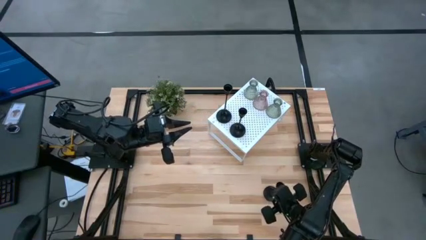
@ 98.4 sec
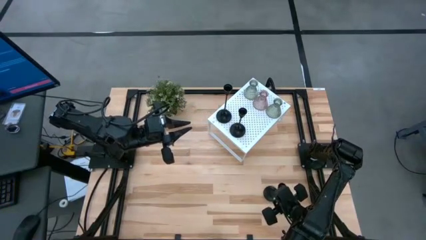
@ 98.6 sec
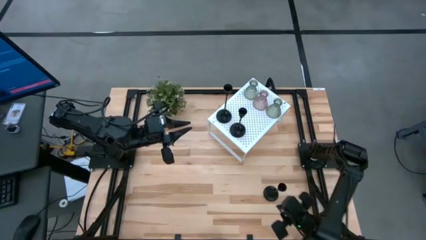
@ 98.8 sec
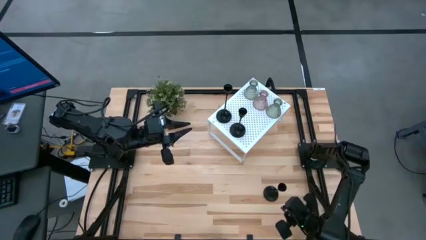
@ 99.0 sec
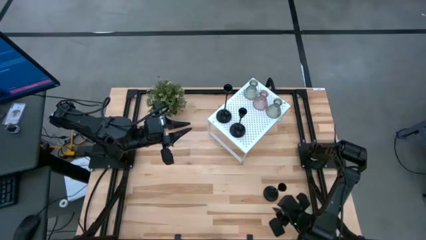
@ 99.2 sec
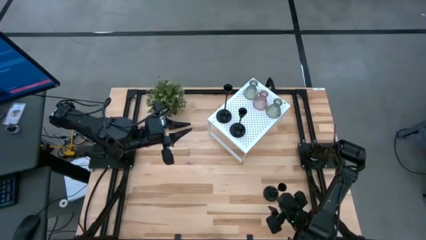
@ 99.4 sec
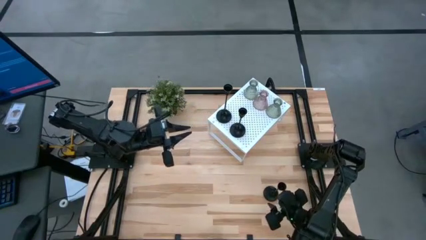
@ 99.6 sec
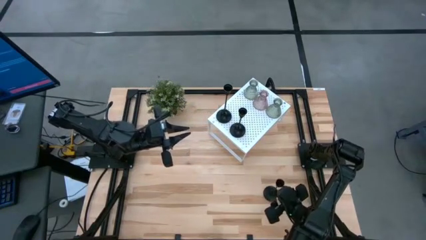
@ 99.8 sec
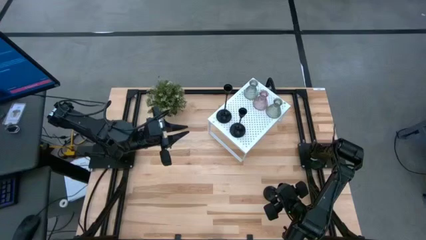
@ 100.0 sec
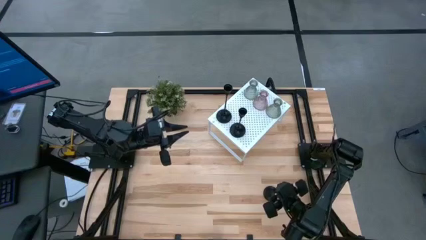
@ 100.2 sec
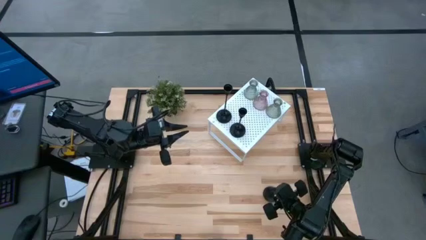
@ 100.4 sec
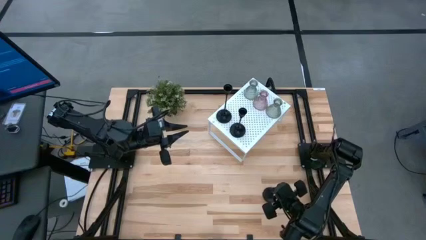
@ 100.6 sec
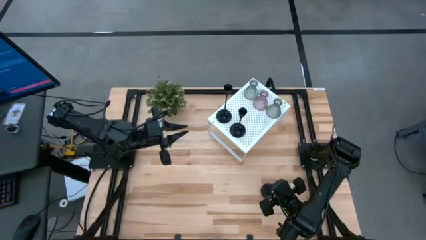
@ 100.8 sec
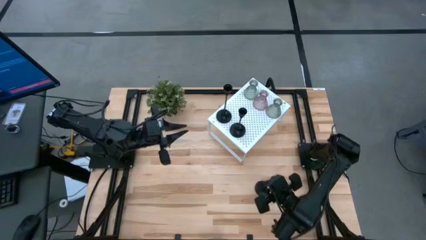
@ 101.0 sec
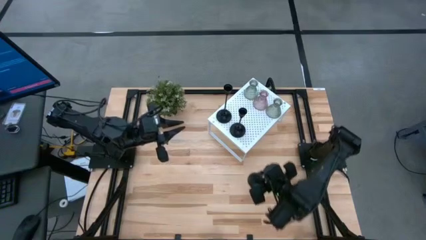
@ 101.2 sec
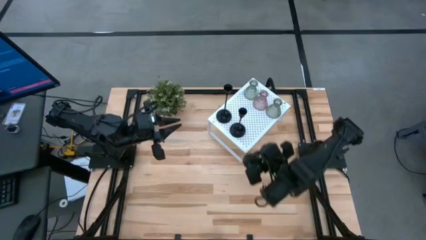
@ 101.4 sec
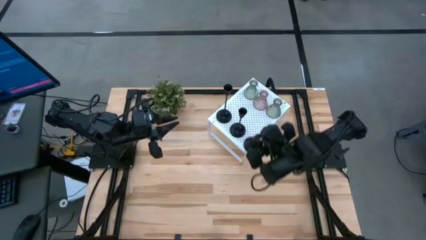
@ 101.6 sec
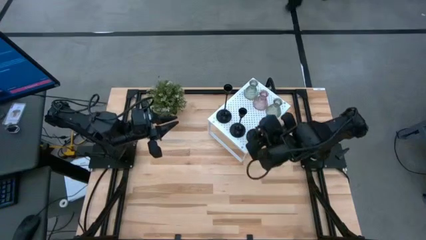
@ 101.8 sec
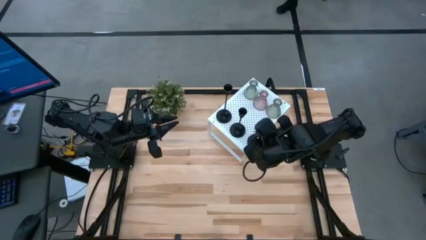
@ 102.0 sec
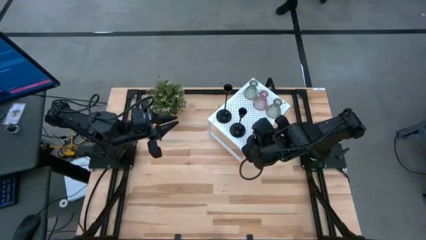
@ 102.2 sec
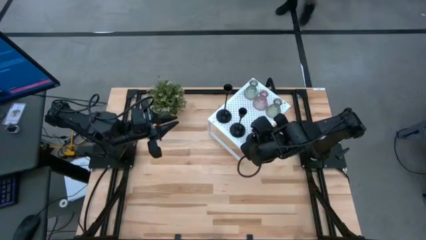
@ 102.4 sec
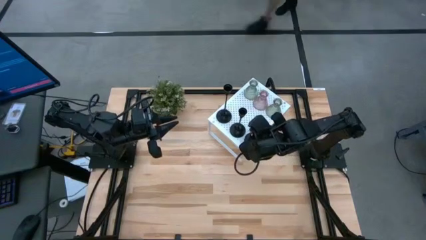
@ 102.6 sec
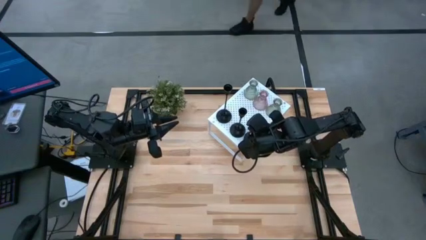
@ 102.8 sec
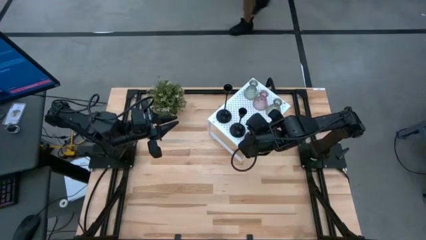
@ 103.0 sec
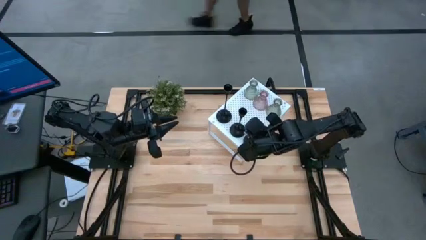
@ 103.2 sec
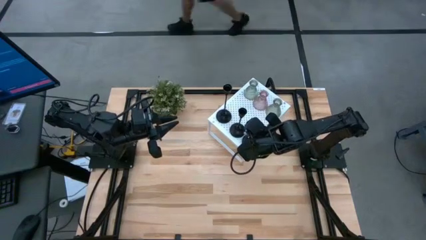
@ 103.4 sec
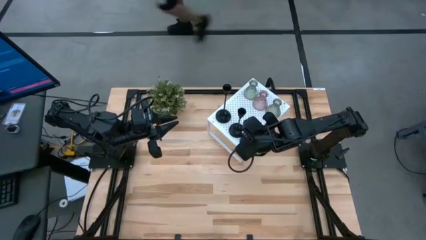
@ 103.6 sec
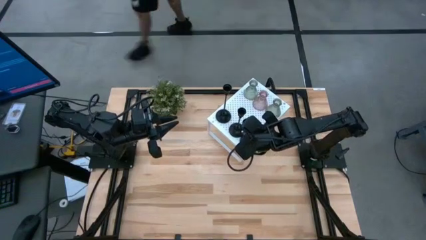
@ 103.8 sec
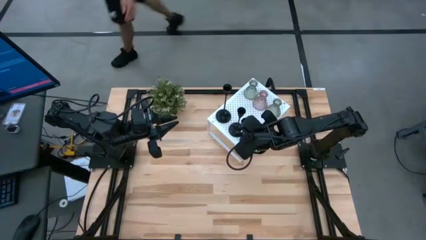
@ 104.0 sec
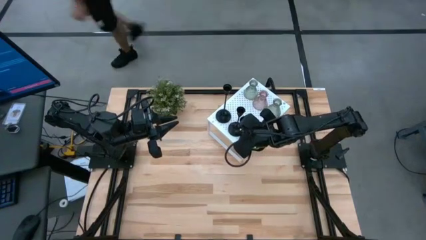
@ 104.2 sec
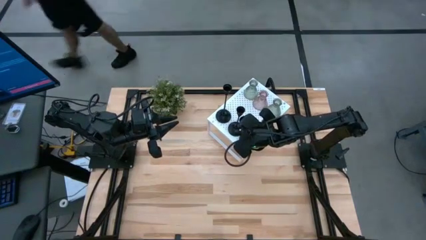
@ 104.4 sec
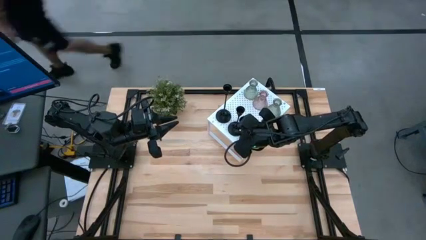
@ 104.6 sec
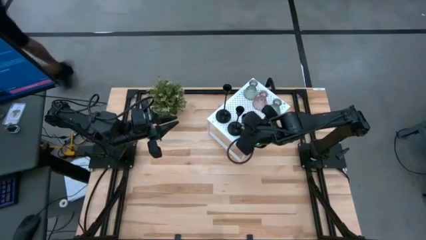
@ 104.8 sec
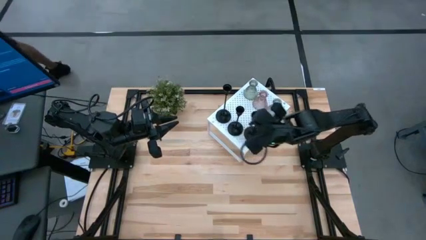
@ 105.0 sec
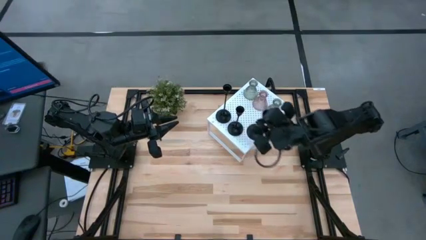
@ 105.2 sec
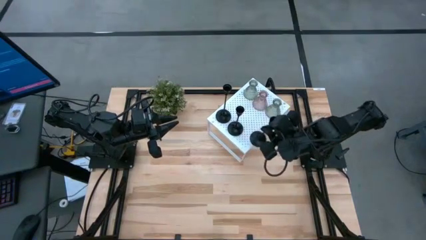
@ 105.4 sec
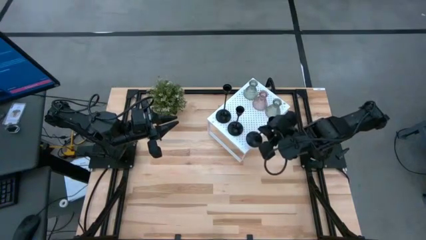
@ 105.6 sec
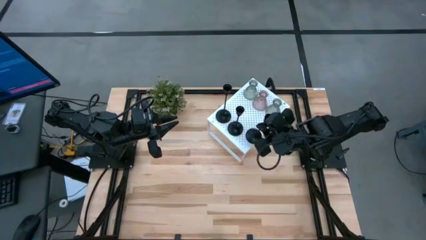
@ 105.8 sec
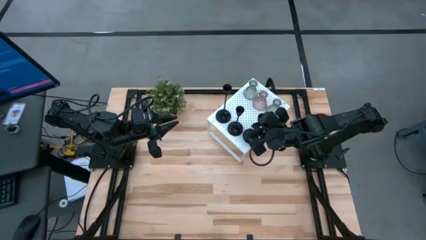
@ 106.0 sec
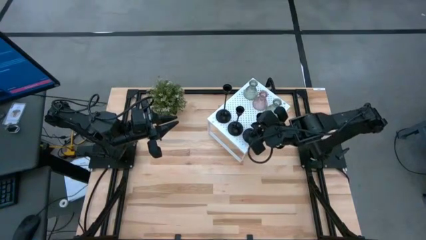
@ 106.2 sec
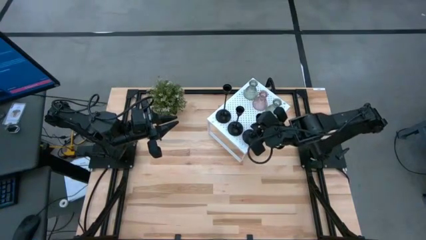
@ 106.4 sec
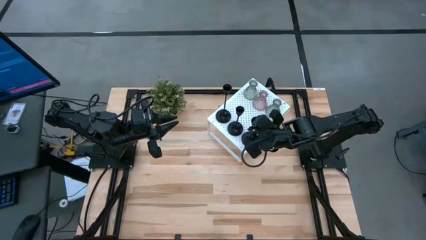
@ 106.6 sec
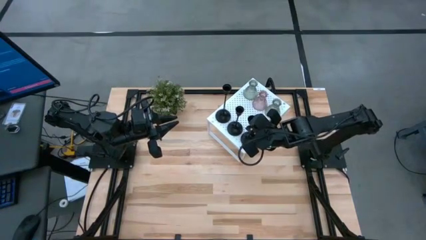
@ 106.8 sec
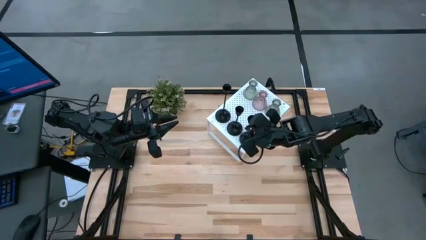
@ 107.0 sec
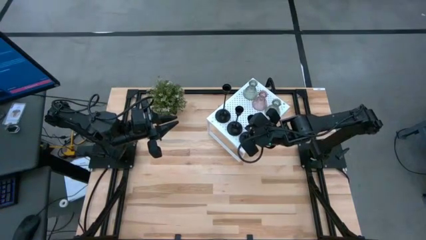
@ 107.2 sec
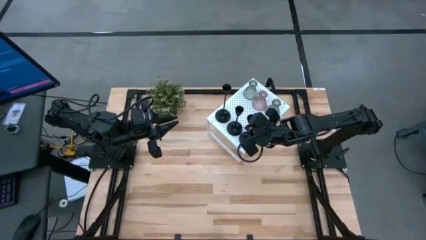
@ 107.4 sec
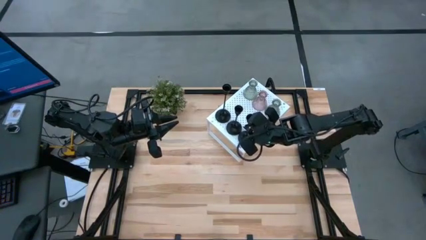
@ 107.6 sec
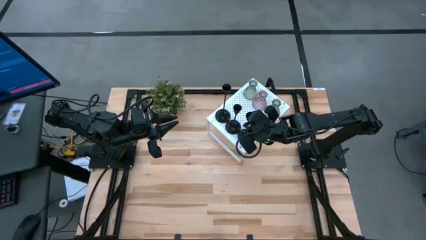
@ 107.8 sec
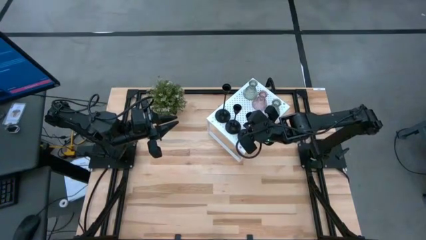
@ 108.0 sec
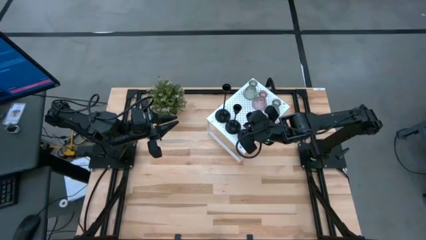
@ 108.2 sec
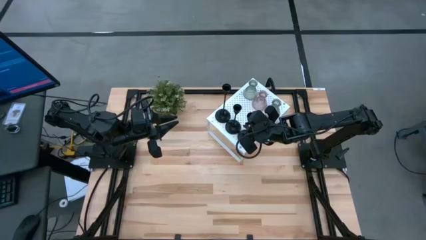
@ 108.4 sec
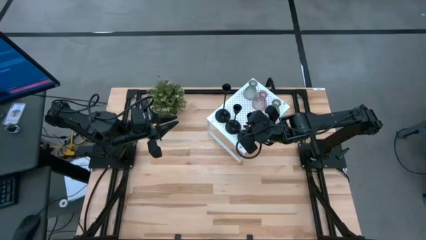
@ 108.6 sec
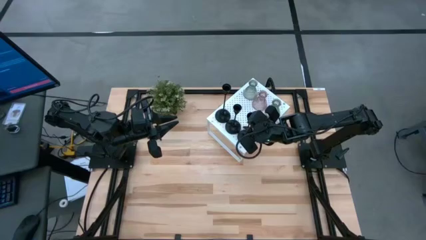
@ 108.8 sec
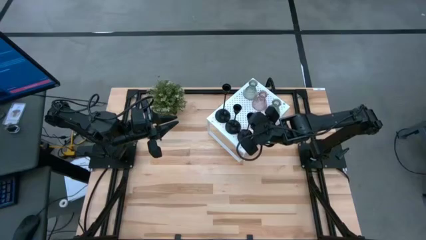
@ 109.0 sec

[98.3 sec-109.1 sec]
Task: Pick & Place candle stick holders
Put the black candle holder on the shelf aligned with the other black candle holders

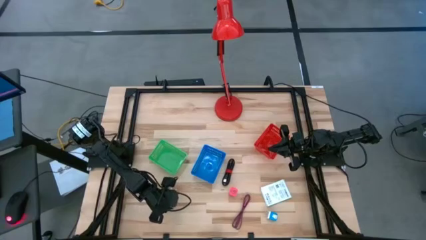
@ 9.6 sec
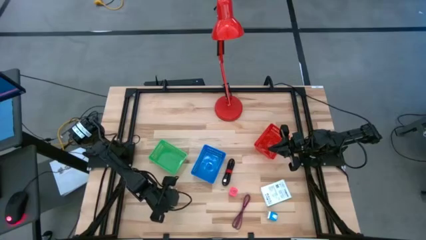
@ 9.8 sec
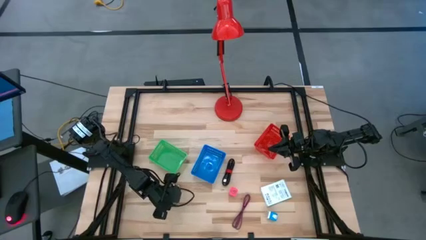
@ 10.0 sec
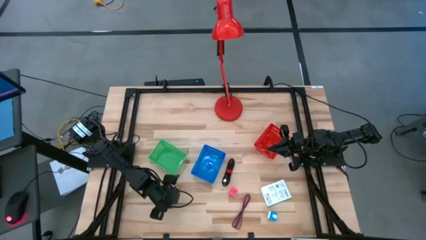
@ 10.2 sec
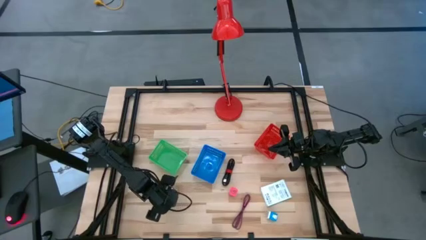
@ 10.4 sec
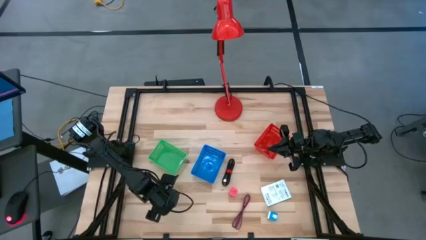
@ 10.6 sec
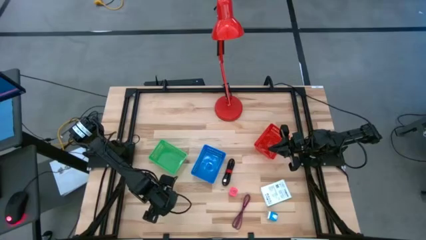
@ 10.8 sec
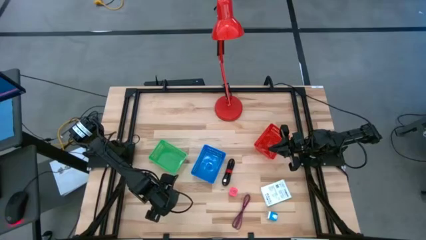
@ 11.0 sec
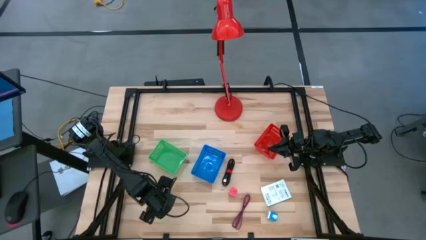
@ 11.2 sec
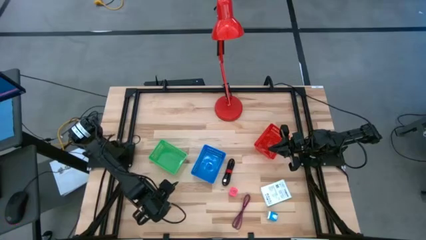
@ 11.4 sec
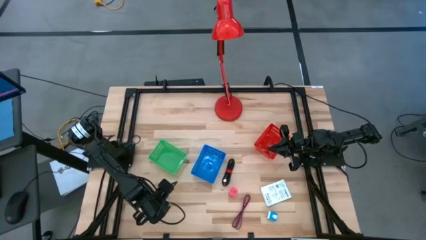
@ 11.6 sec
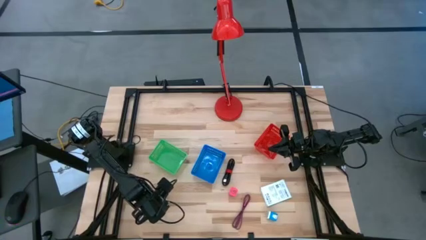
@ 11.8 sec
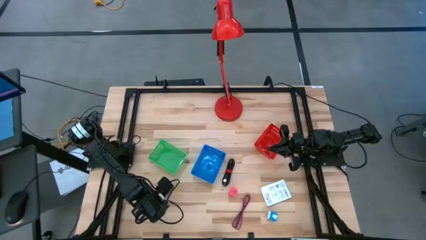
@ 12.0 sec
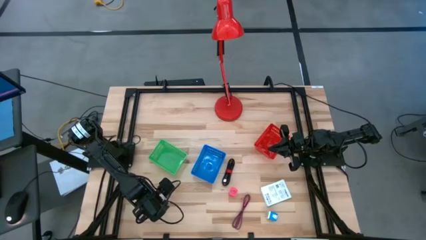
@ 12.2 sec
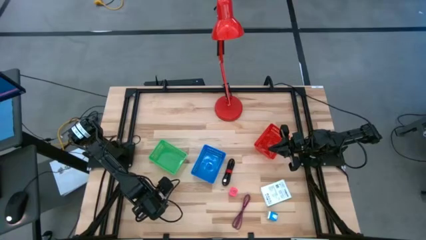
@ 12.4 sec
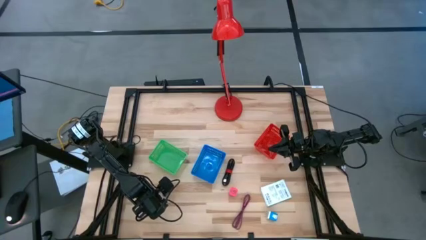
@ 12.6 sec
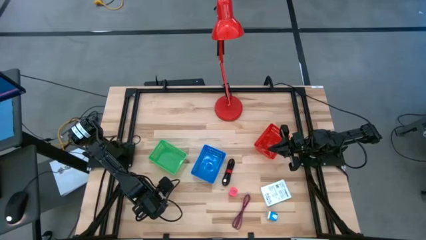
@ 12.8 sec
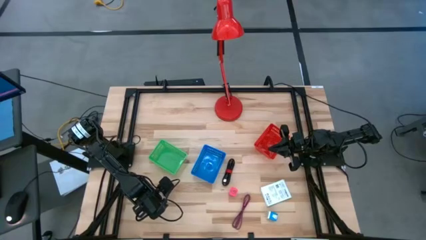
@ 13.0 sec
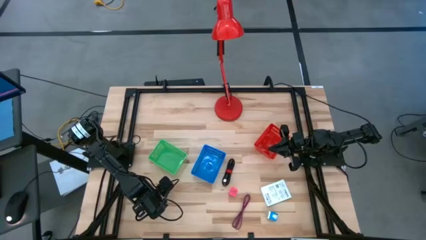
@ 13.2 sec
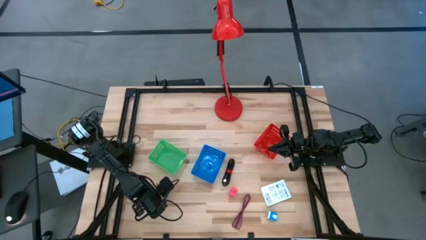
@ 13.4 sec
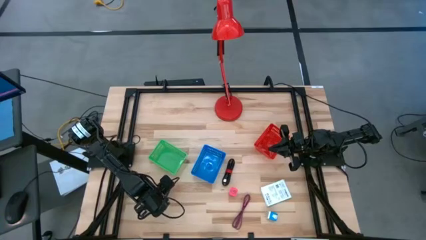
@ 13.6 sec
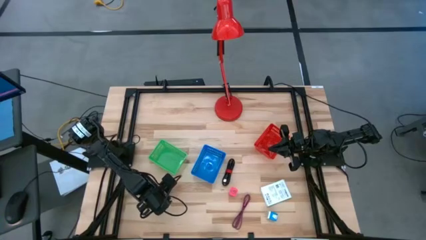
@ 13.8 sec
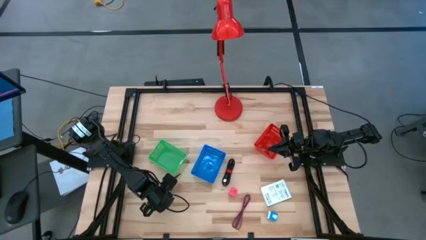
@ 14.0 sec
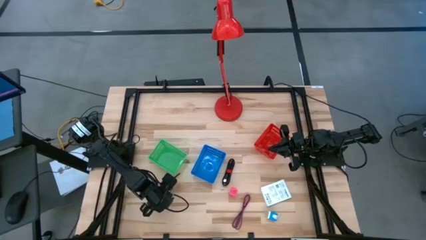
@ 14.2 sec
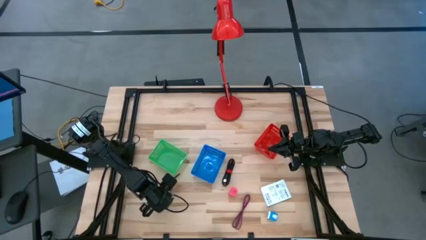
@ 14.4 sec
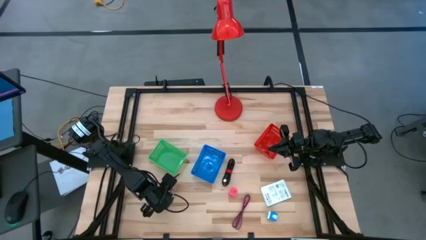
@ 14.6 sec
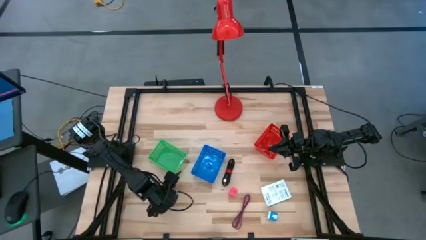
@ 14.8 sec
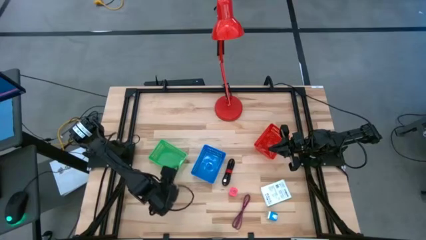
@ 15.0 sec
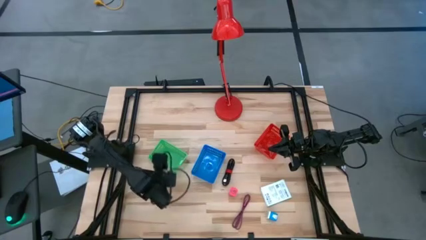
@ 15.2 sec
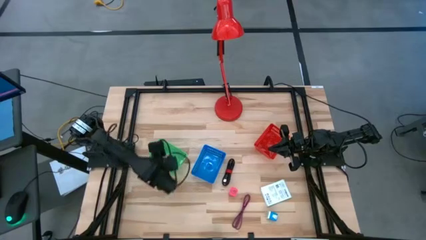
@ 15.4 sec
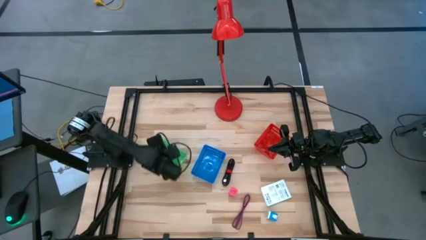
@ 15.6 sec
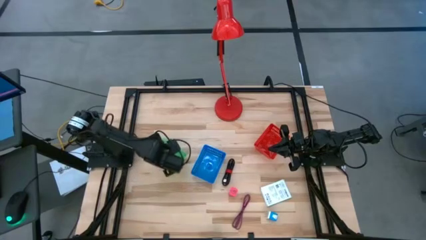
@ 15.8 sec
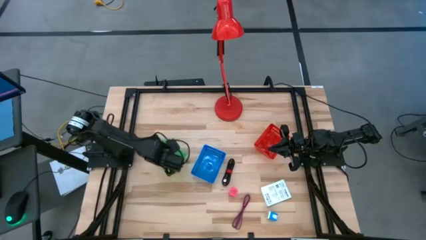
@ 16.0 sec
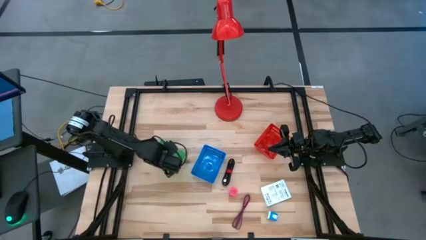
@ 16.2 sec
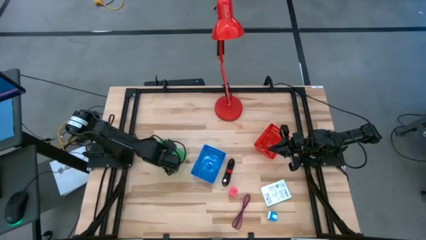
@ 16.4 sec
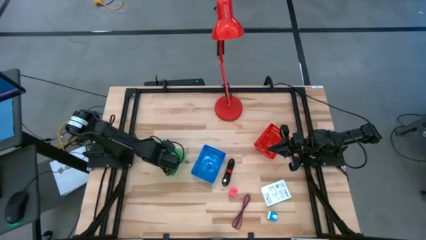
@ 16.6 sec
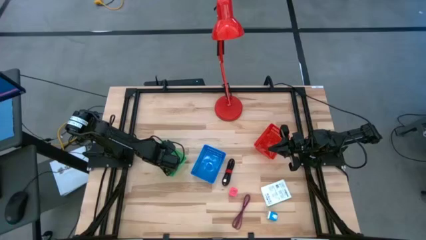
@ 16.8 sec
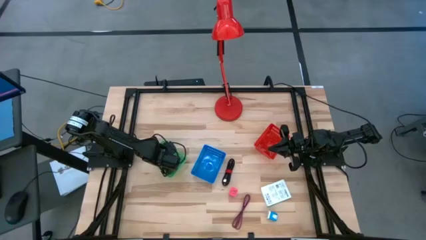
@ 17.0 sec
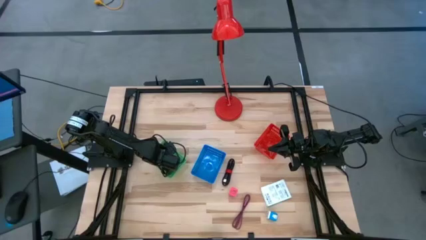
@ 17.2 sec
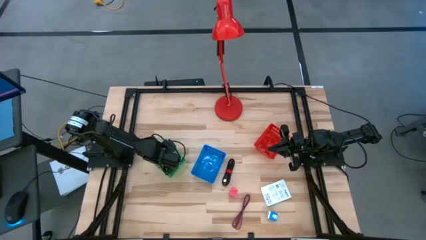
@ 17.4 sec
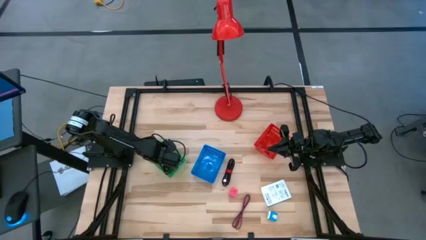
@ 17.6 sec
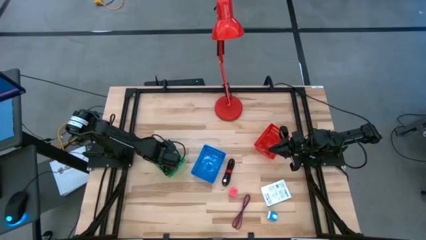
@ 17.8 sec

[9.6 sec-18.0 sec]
Task: Pick and place items into bin
Put the white charger adapter into the green basket
